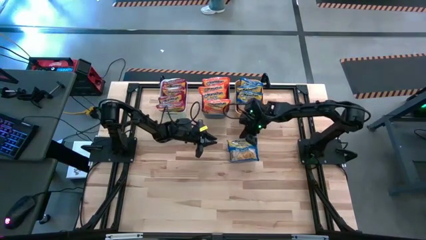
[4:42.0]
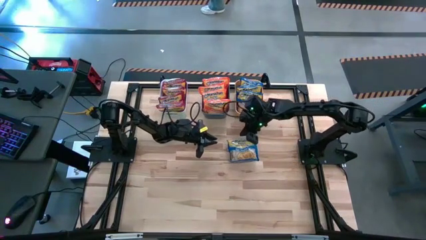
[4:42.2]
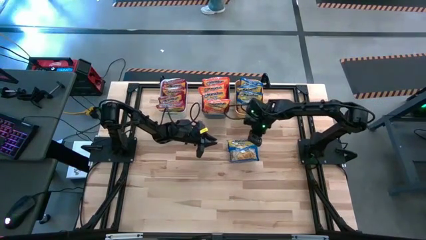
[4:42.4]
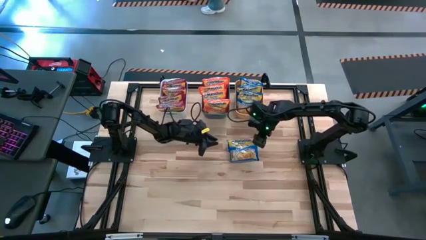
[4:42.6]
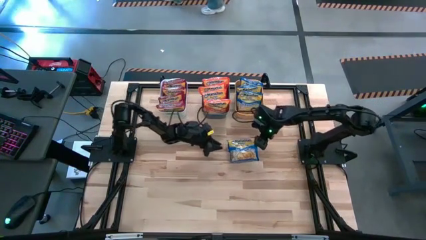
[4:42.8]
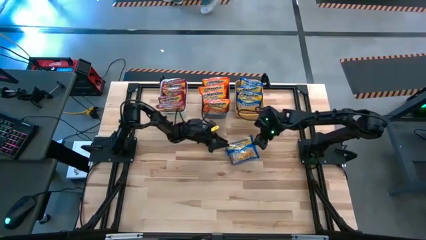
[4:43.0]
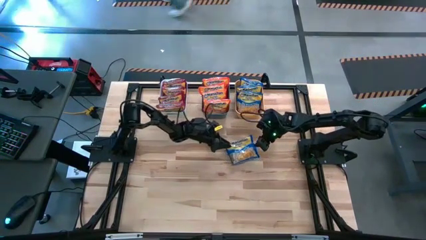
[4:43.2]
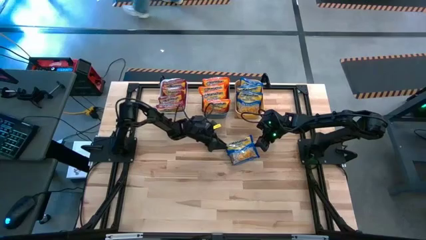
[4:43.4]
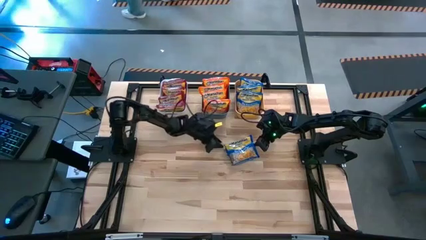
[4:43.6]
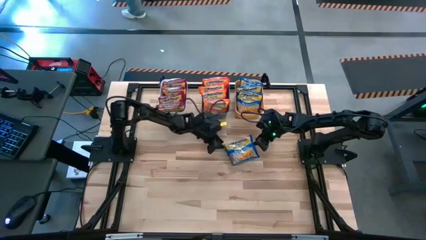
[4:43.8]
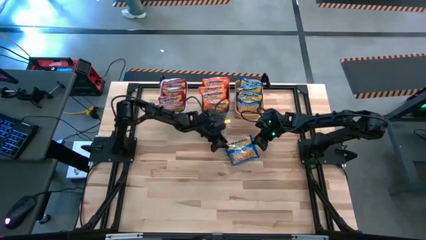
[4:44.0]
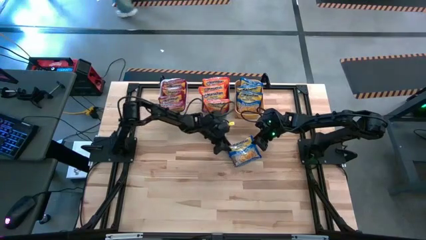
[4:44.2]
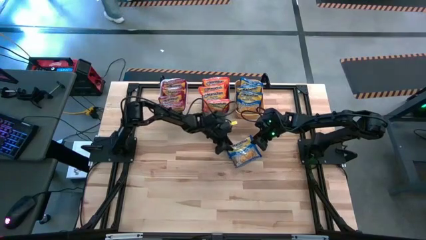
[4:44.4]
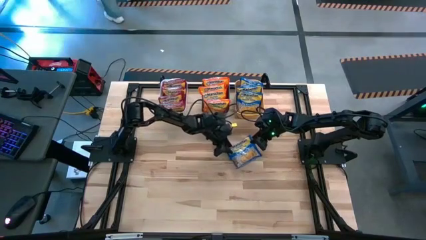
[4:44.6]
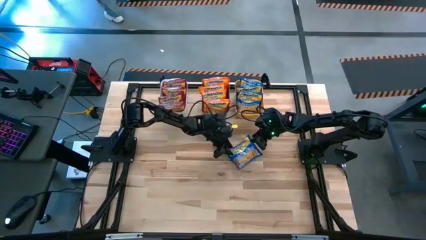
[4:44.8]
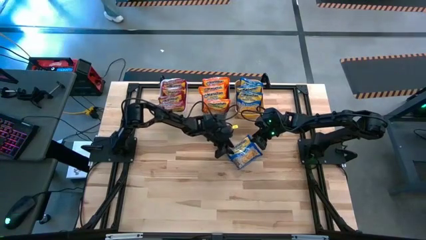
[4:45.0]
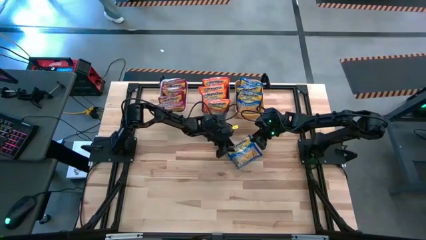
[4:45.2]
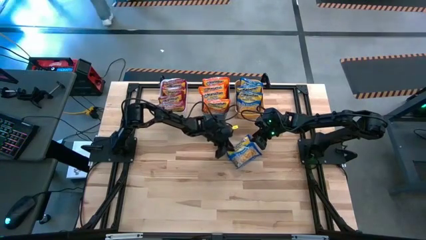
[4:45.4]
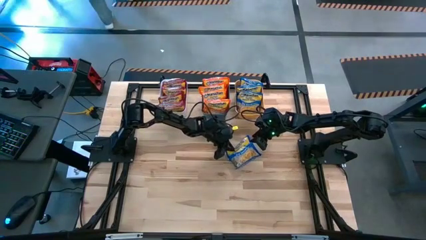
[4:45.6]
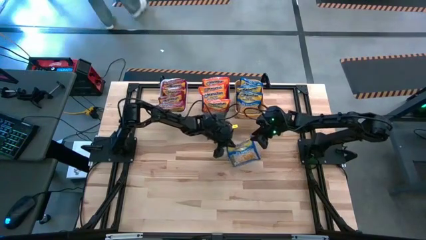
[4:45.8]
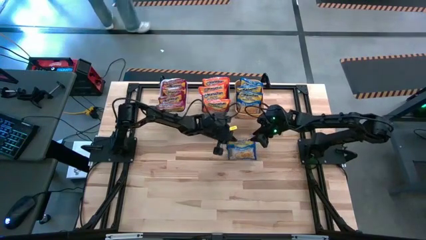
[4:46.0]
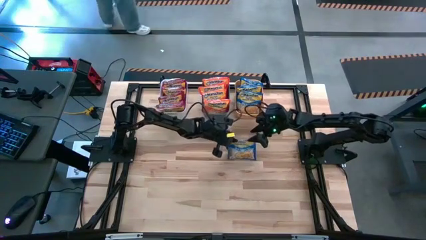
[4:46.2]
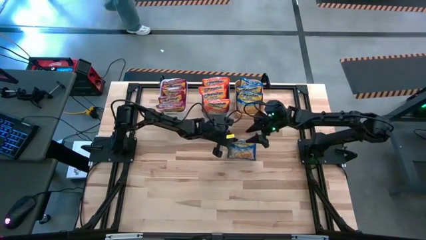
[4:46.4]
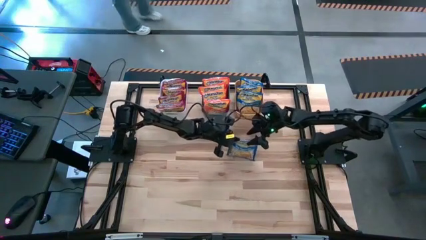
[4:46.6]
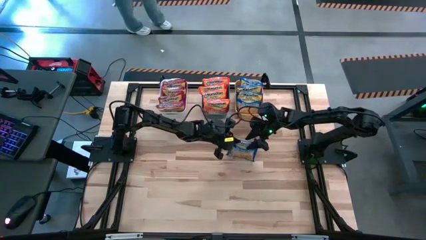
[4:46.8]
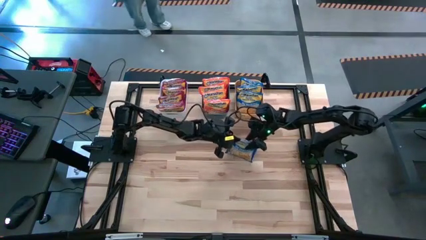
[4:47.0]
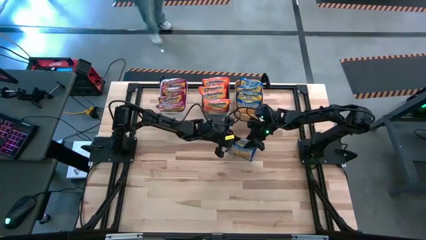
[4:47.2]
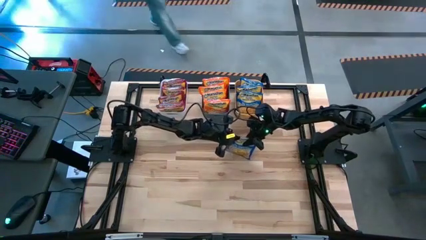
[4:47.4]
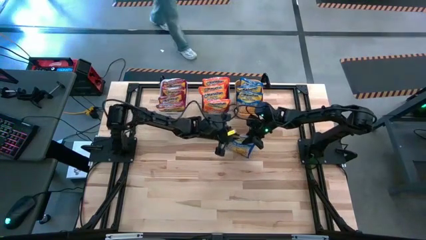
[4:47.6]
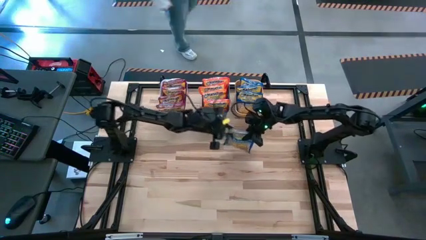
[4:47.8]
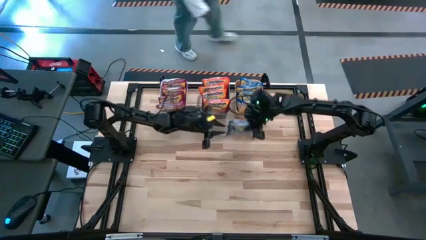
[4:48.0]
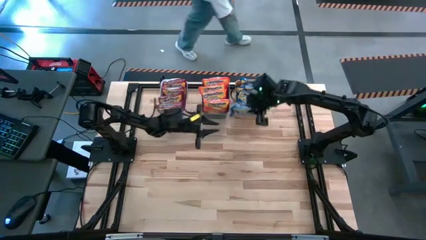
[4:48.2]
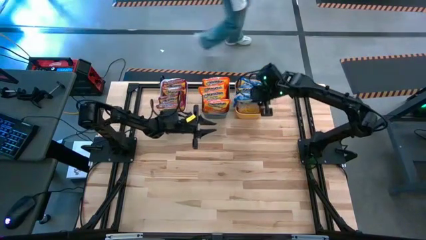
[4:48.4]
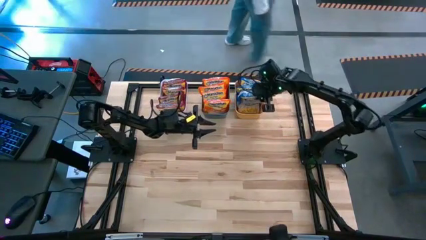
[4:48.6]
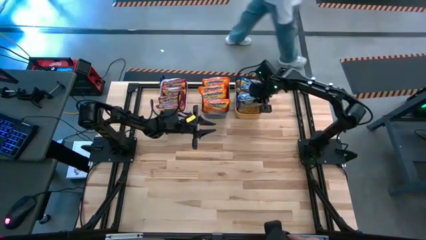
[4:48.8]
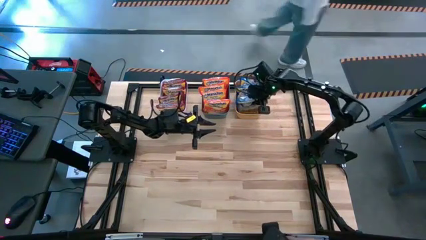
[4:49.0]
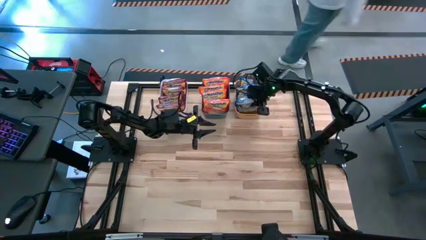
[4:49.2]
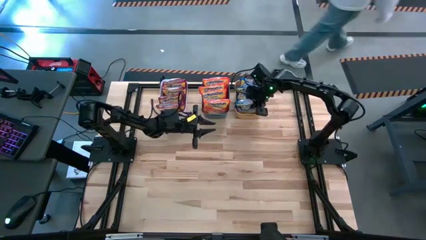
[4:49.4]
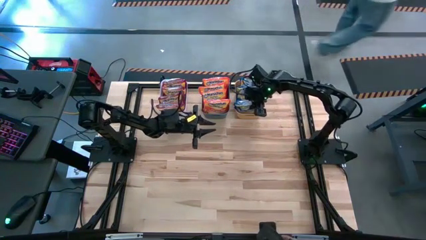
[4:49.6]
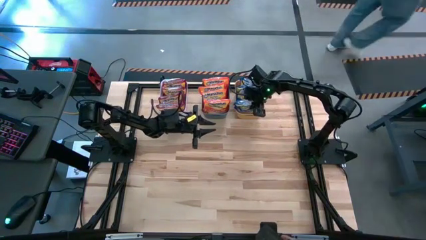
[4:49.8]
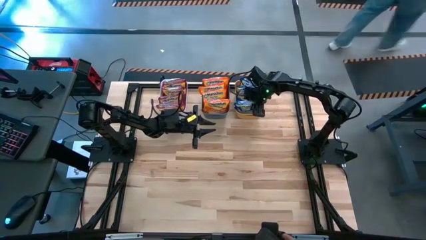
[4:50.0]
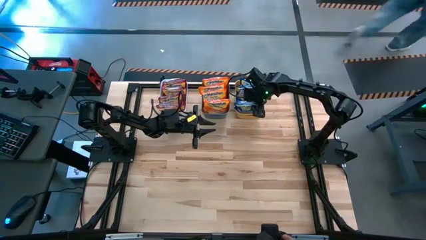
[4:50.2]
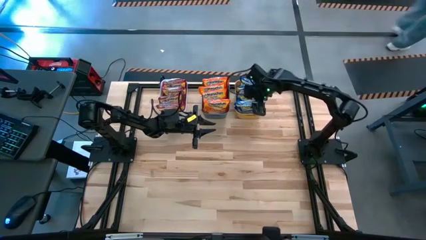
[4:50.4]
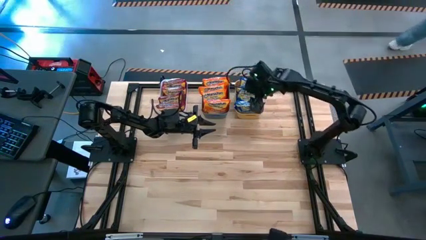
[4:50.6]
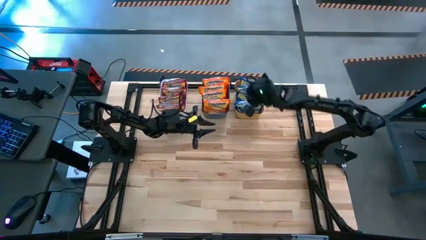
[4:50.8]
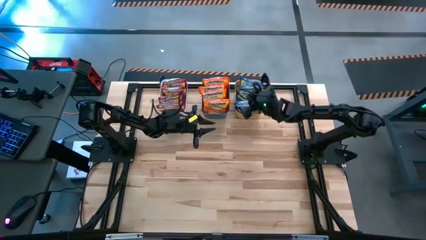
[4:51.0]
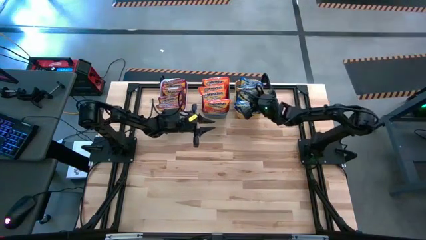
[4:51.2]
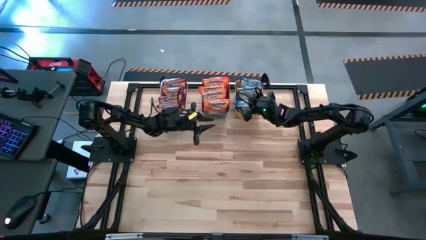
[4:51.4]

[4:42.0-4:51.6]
Task: Sort Maruchan noodles
Put the blue noodle pack into the yellow bin

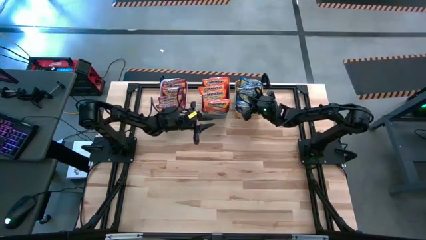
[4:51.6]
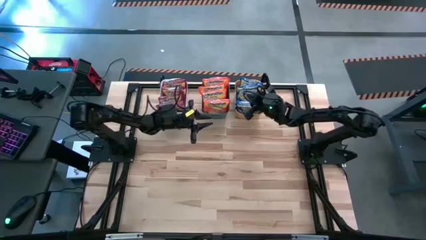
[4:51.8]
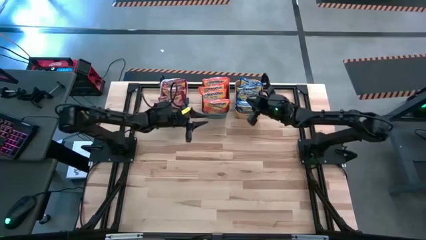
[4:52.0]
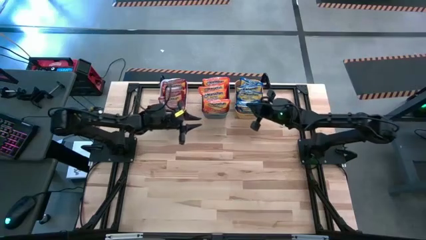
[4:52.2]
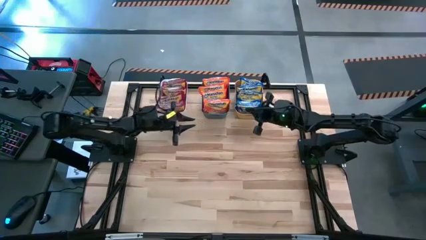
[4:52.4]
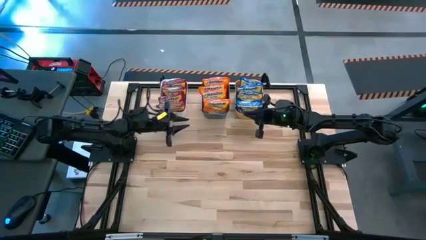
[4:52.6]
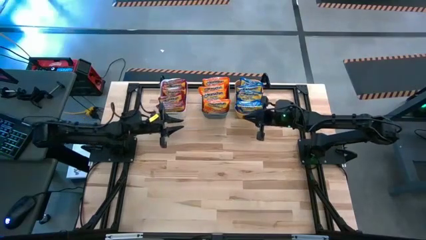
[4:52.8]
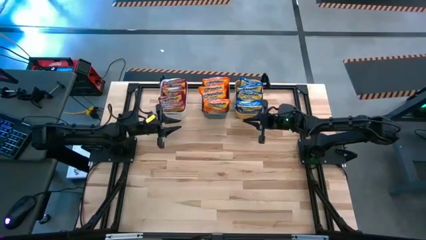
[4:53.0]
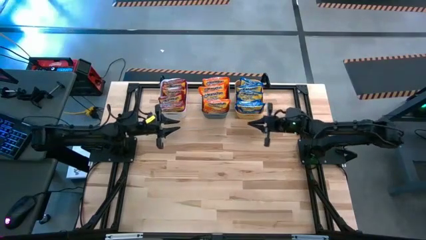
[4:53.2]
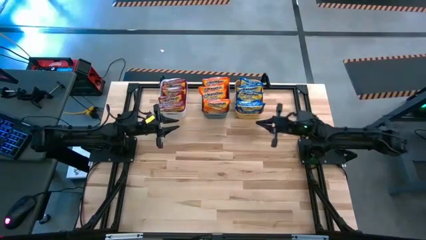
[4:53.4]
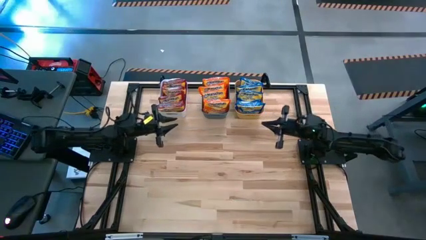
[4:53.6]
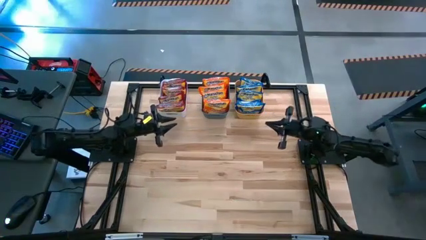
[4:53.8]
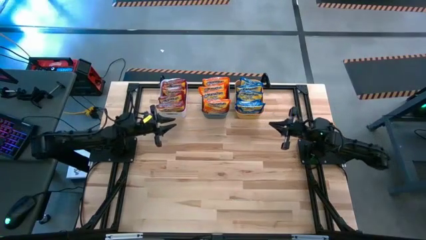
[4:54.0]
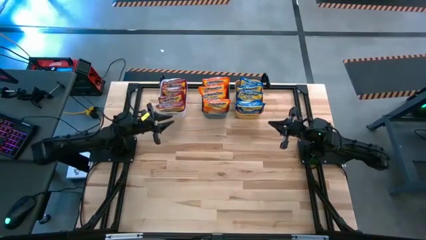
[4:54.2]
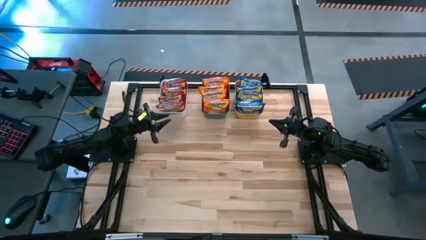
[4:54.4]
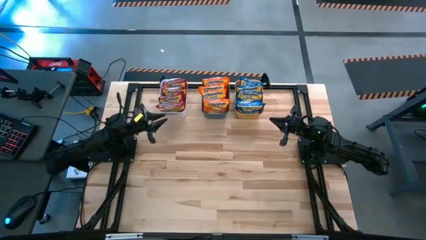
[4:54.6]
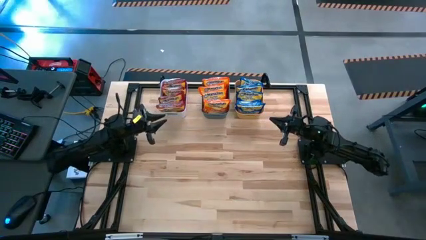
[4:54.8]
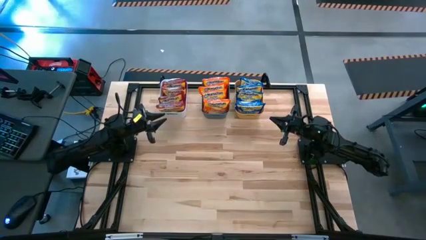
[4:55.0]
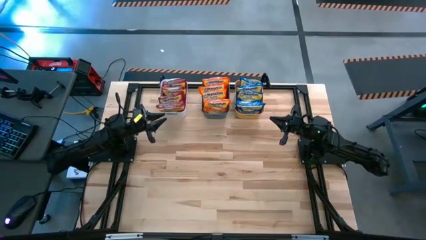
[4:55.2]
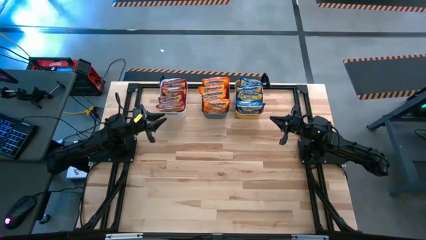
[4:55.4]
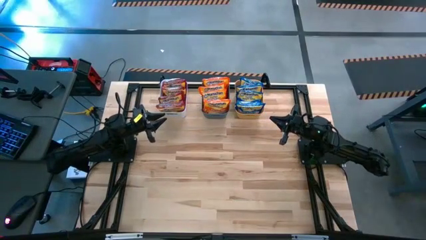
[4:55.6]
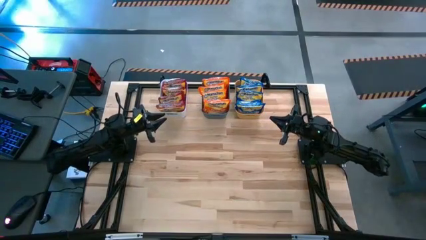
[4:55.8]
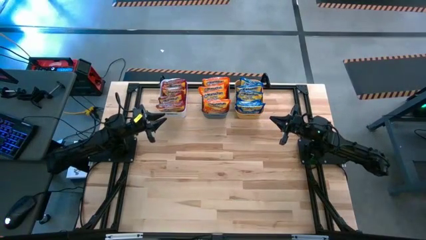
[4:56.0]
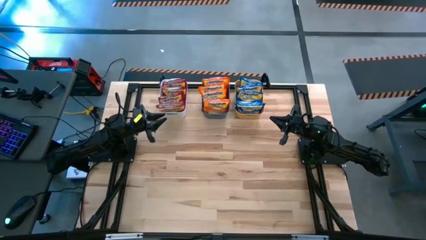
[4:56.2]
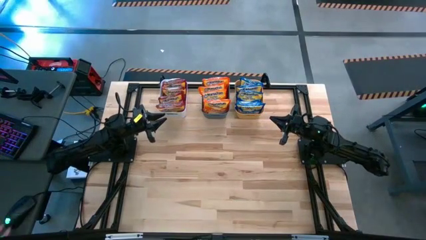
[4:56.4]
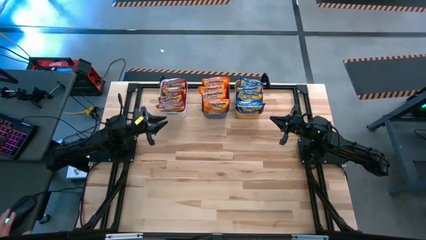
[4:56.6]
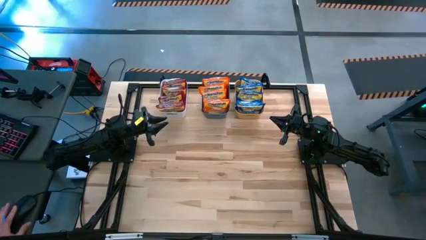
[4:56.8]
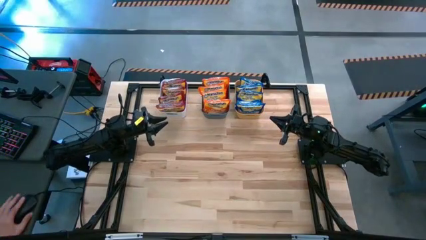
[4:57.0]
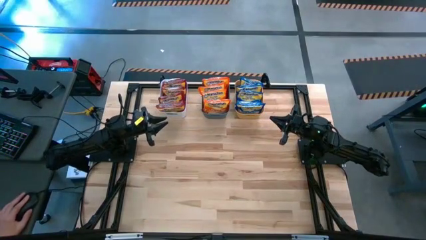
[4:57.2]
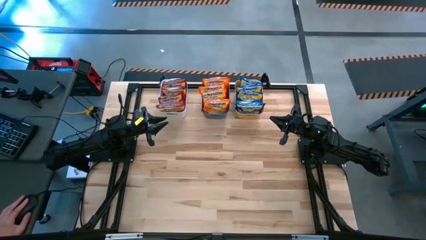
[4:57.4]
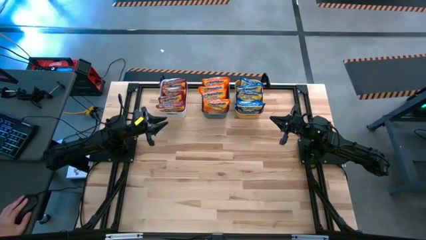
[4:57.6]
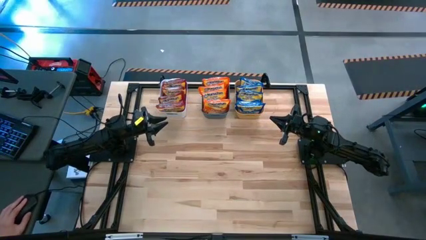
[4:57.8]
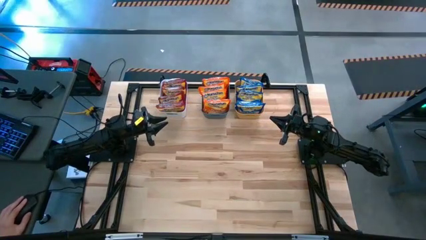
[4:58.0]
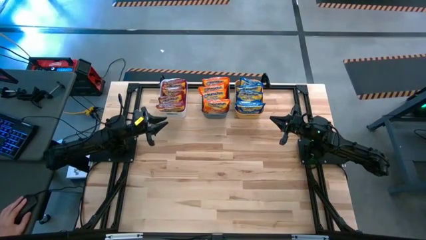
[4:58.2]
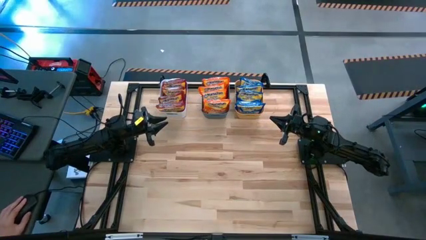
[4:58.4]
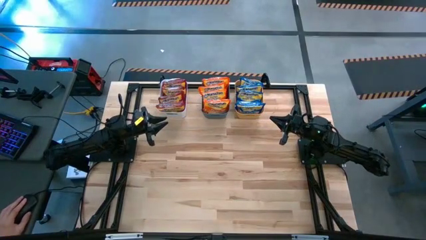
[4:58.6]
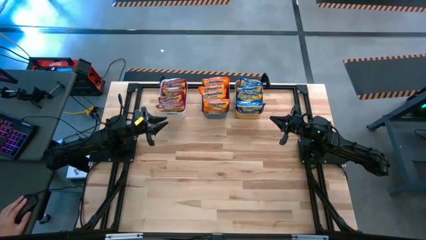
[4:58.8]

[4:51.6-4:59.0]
Return to Home Position
